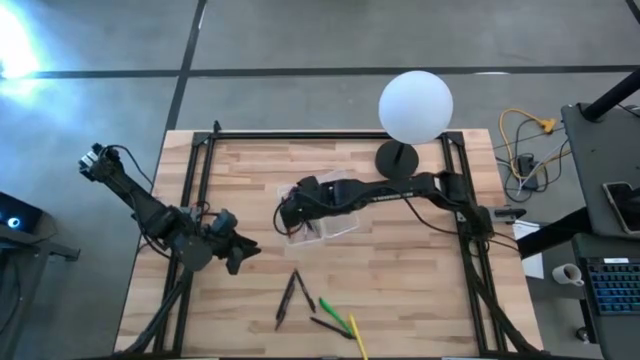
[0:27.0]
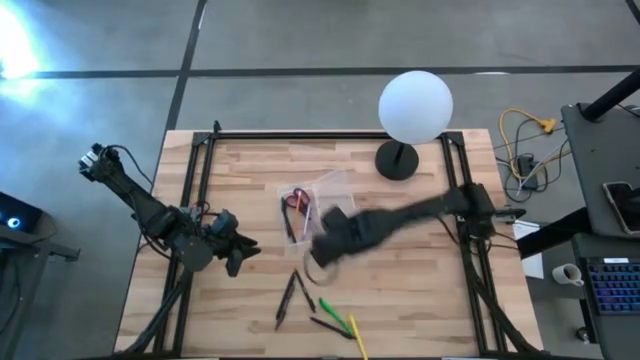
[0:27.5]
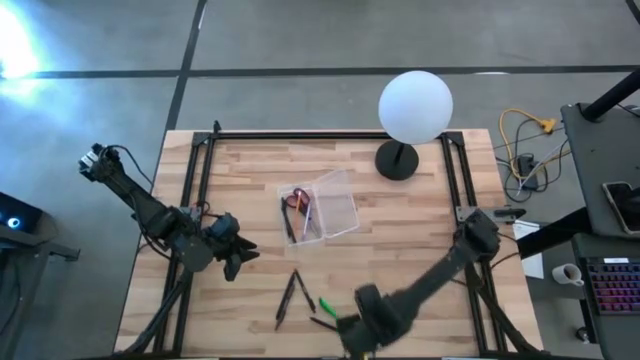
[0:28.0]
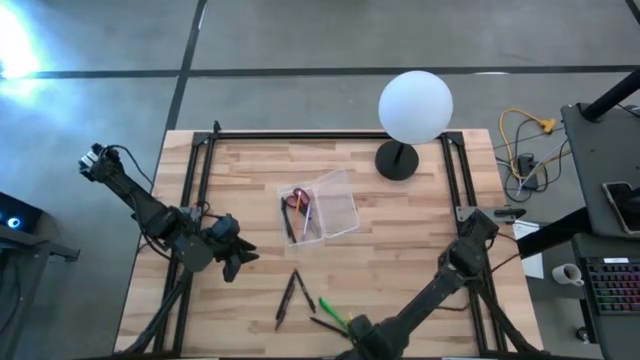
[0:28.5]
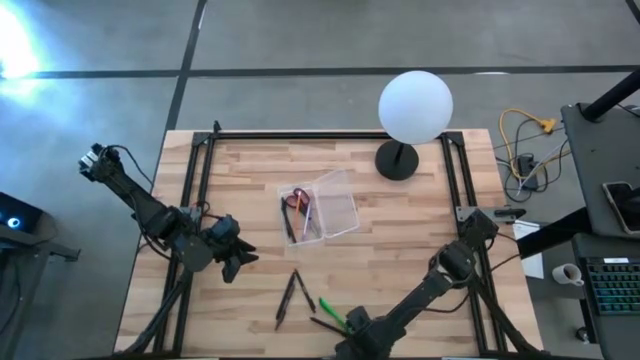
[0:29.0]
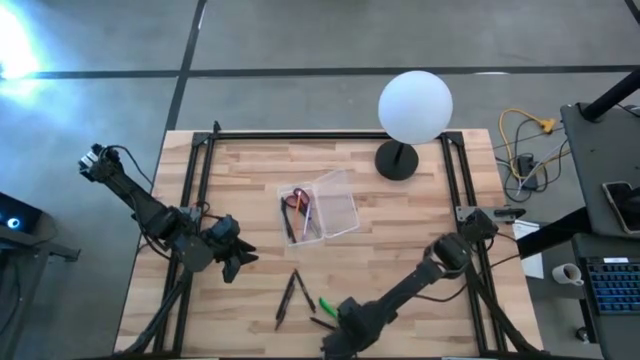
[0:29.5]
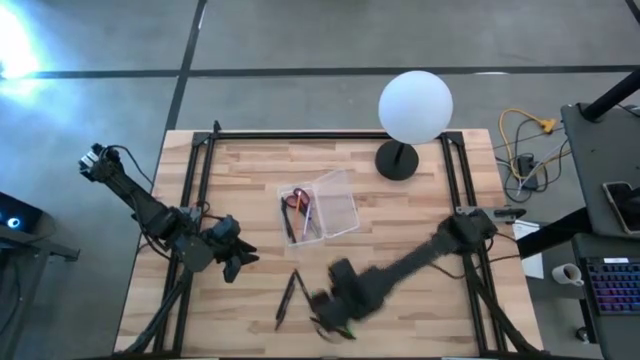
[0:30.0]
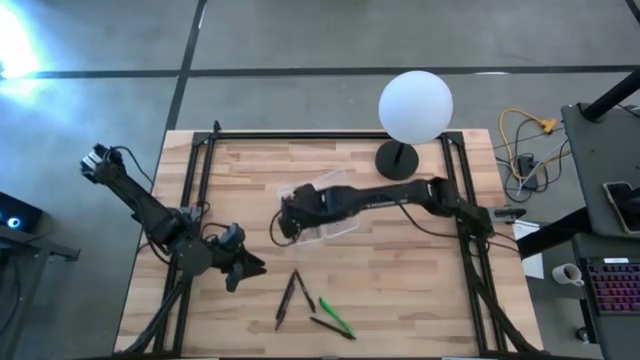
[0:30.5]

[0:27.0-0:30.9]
Task: Pick & place school supplies into a supply box
Put the yellow pen into the transparent supply box

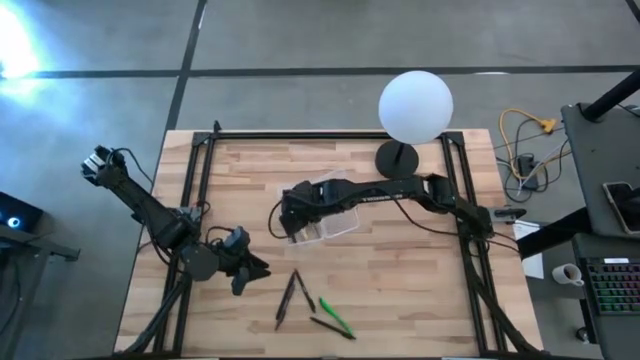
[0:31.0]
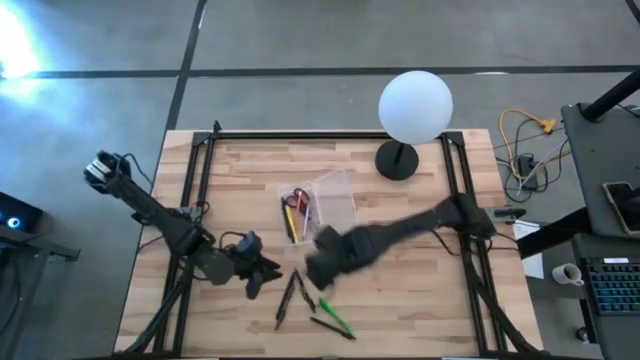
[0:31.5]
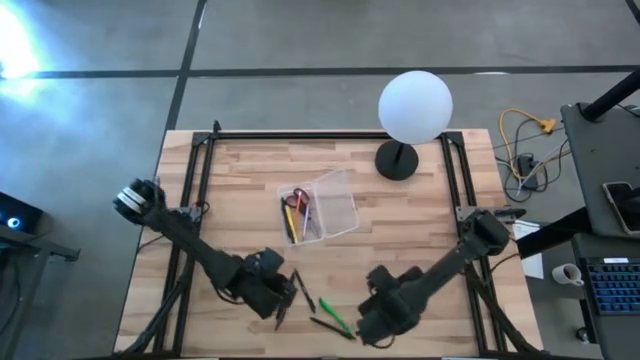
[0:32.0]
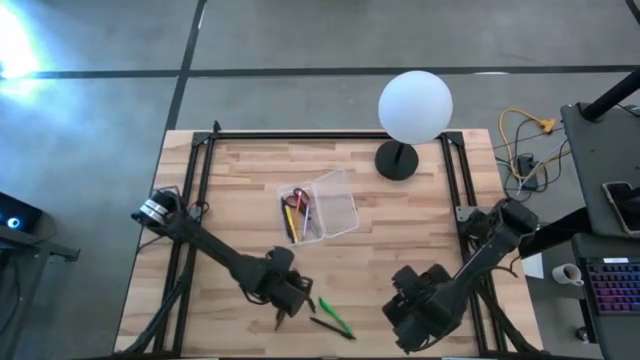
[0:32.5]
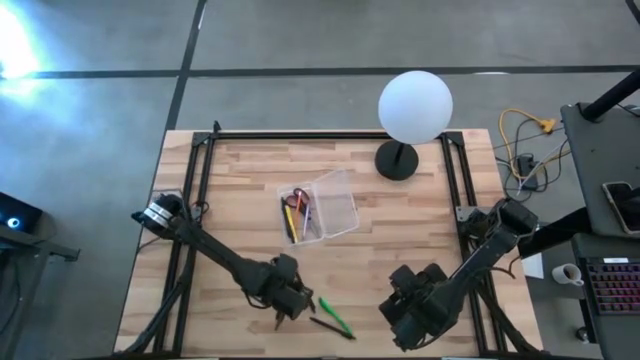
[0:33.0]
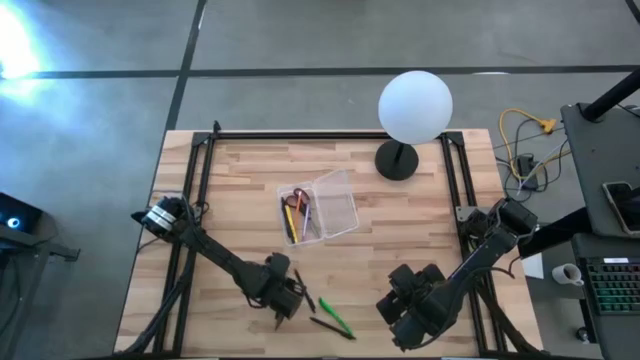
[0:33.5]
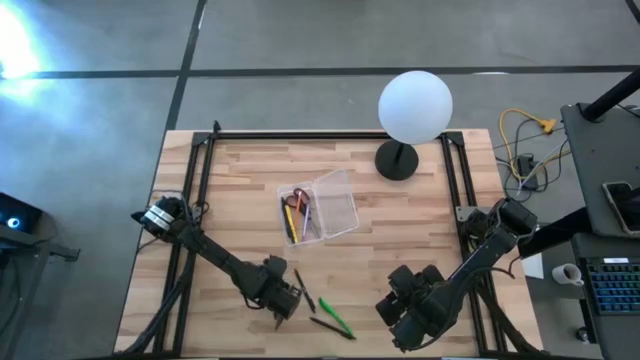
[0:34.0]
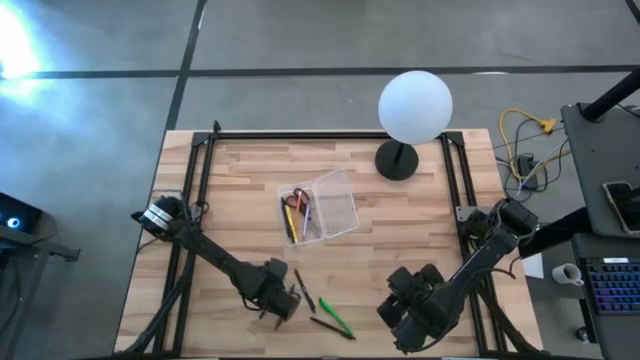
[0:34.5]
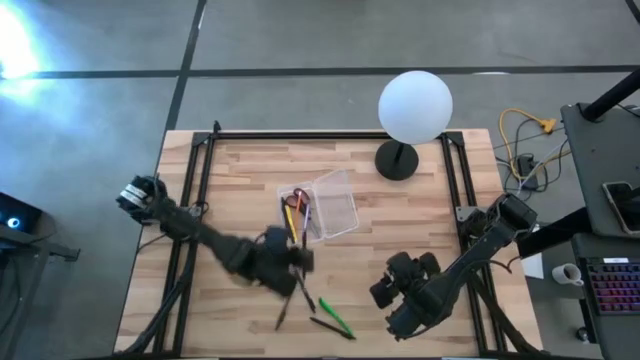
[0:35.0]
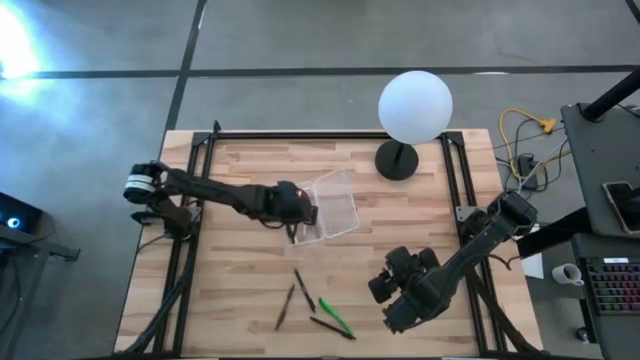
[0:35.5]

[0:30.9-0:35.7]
Put the black pen into the transparent supply box

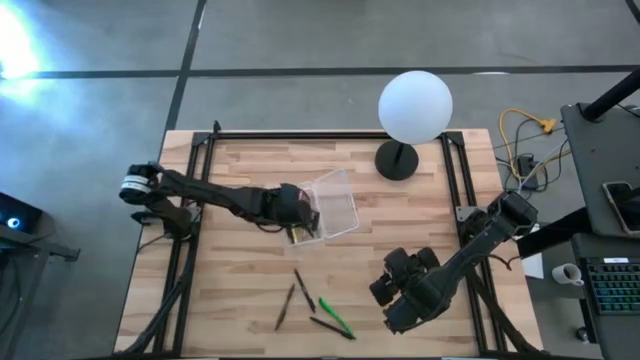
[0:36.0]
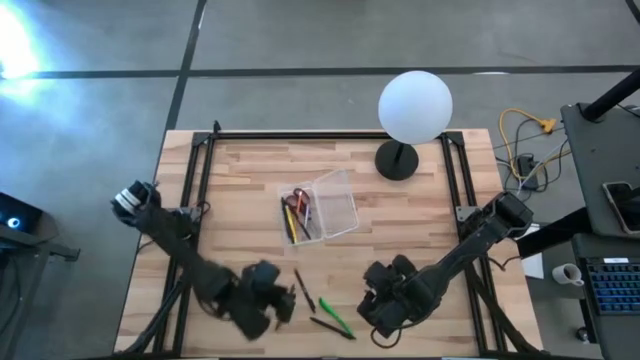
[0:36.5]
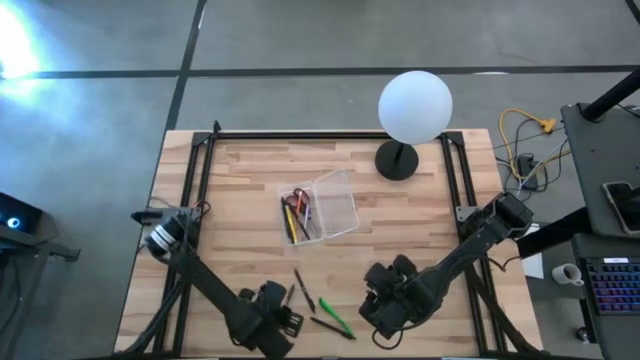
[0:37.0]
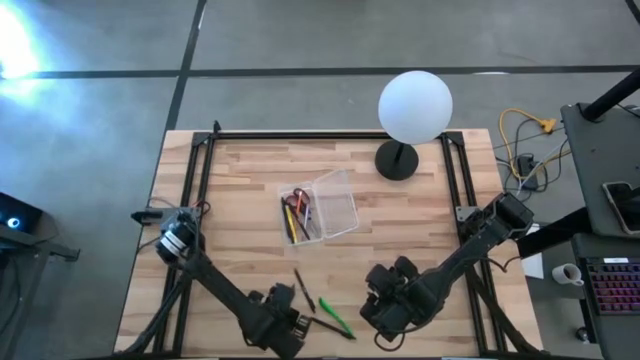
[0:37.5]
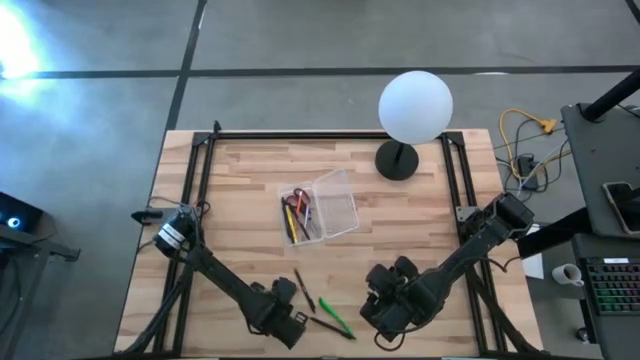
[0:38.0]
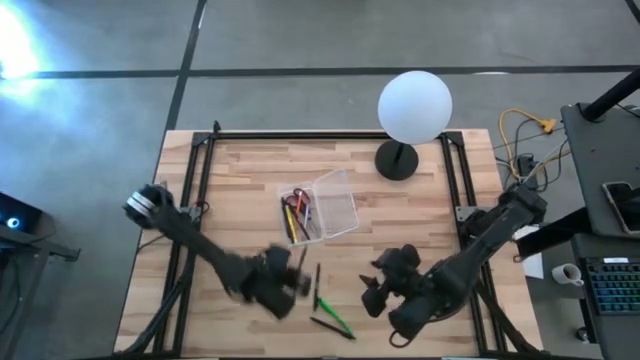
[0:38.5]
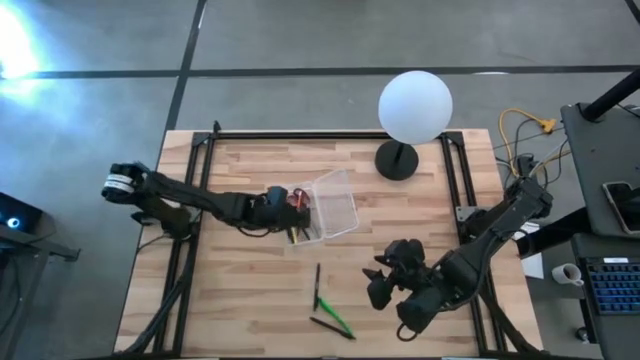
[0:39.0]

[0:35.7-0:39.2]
Put the brown pen into the transparent supply box

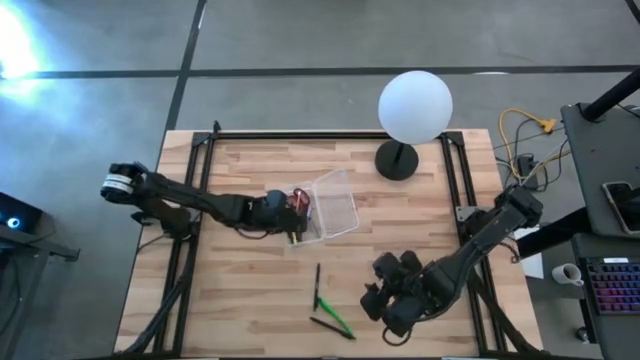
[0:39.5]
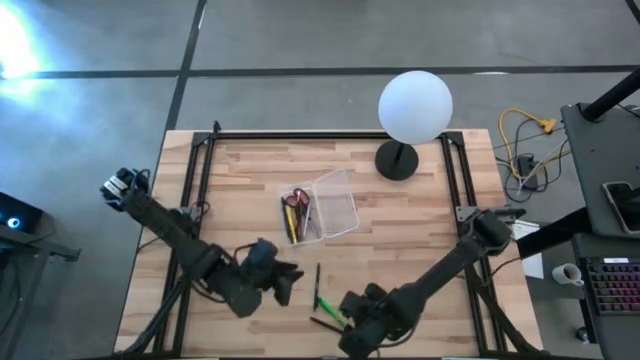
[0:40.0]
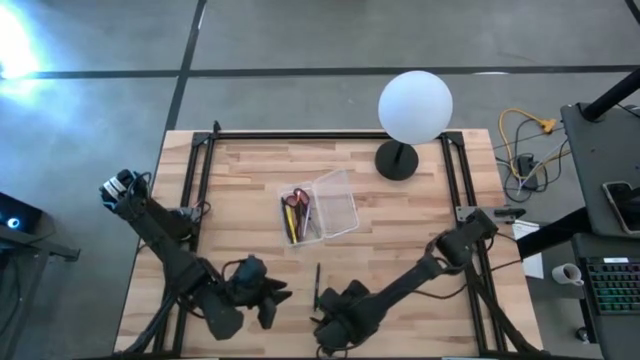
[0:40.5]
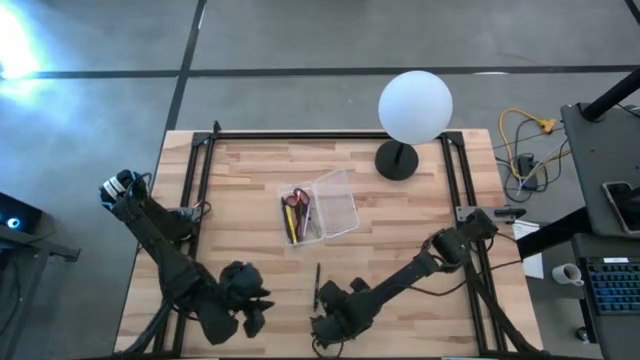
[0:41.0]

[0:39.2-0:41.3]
Put the green pen into the transparent supply box

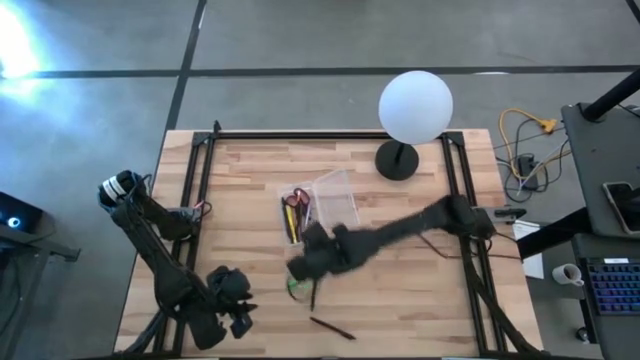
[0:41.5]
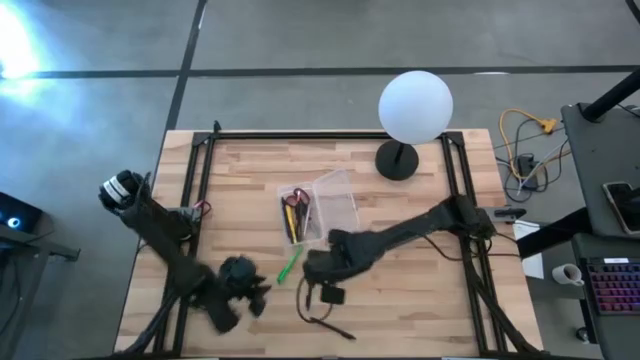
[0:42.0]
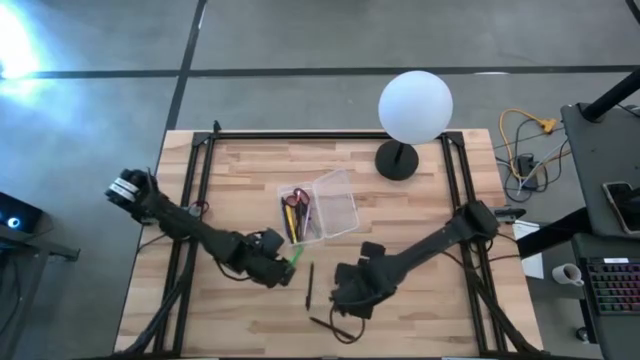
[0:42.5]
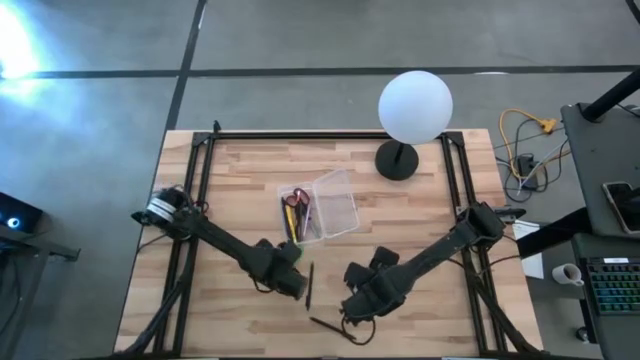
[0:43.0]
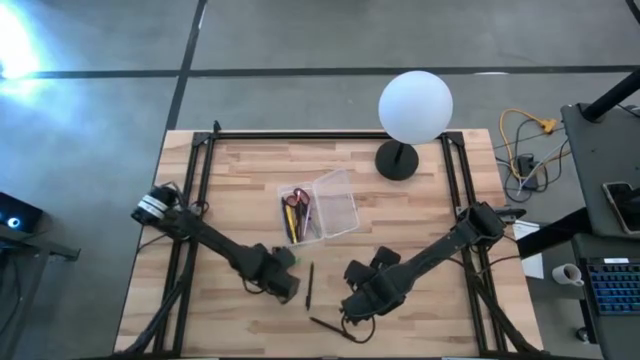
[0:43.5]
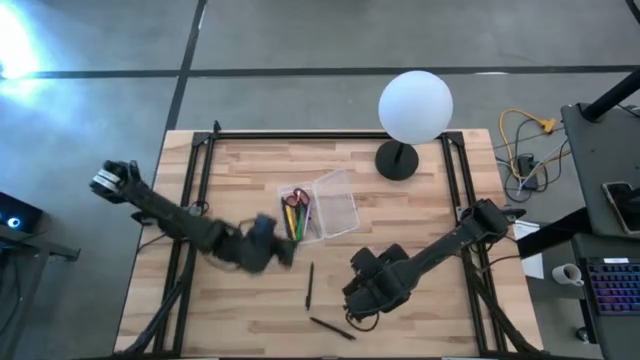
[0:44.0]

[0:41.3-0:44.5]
Put the green pen into the transparent supply box

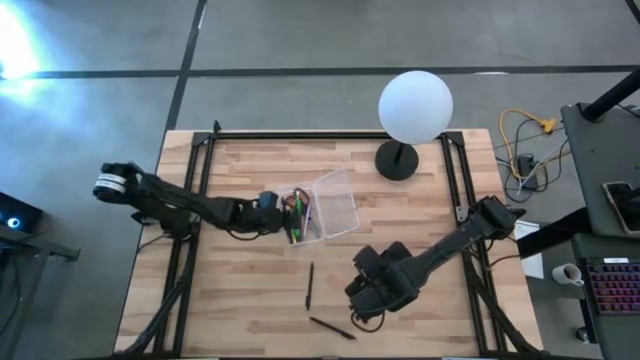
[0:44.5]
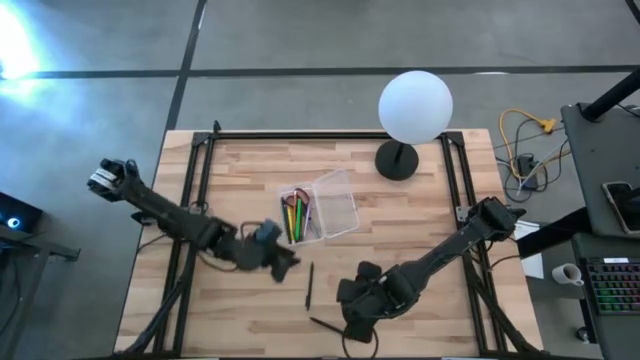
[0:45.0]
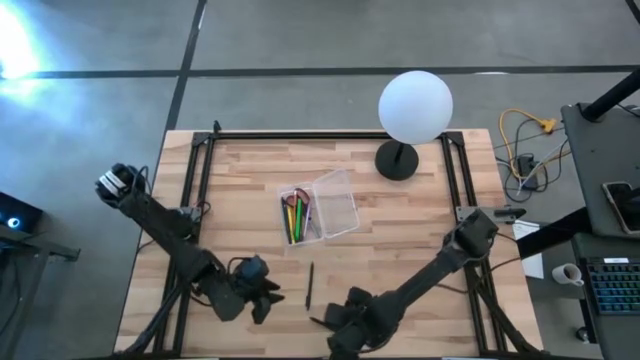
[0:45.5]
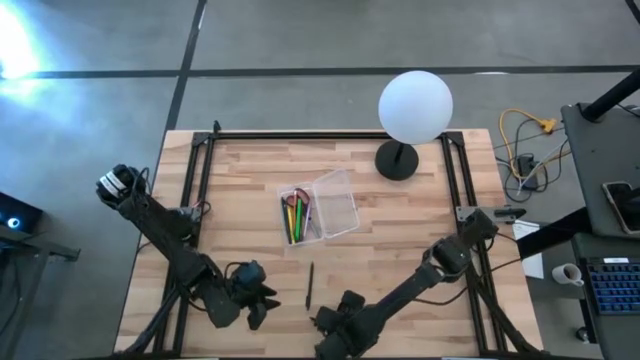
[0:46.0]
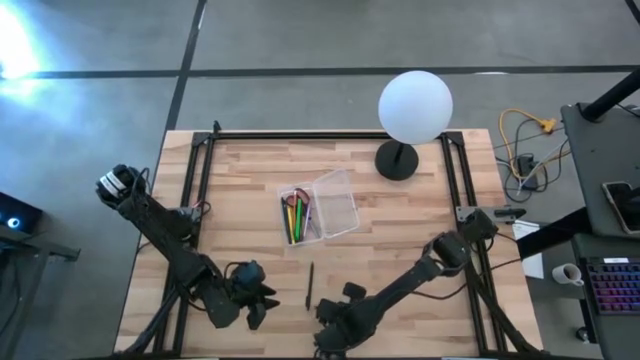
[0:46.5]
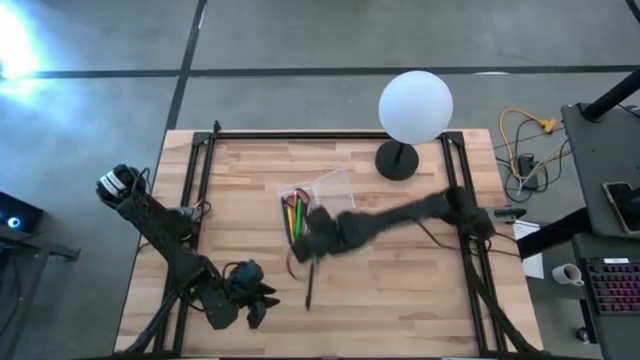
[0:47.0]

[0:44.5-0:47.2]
Put the black pen into the transparent supply box

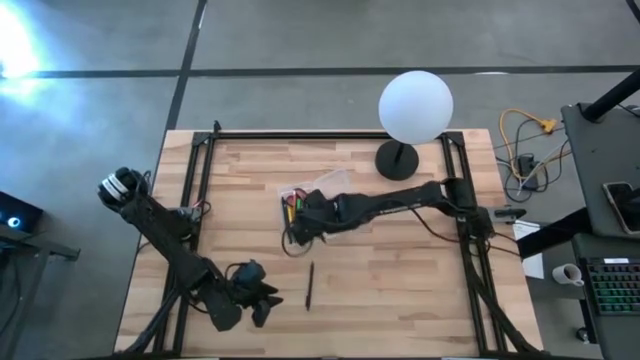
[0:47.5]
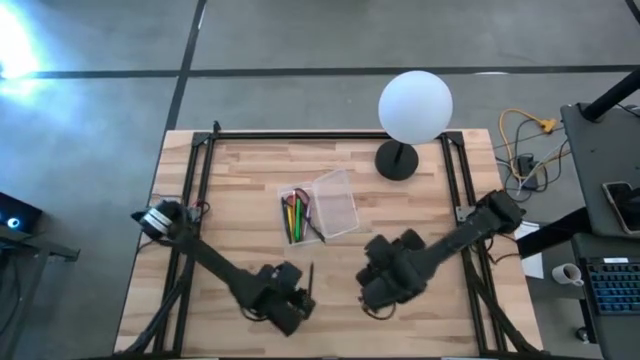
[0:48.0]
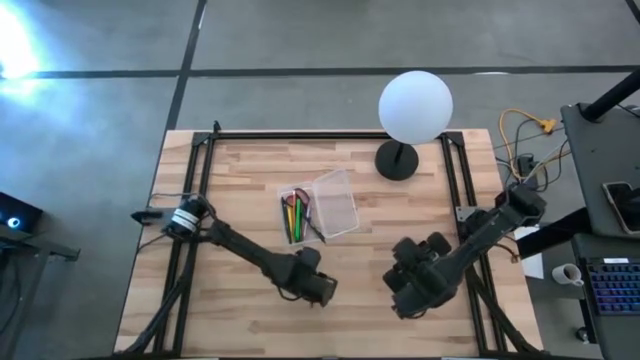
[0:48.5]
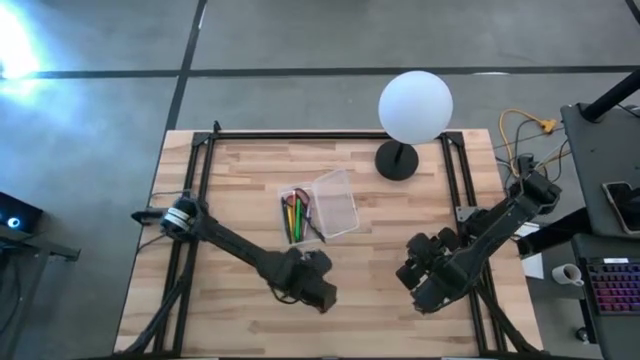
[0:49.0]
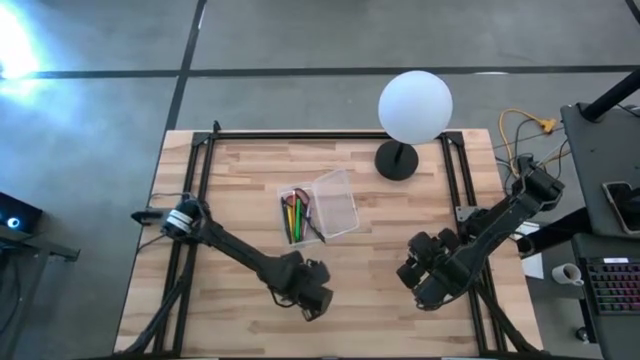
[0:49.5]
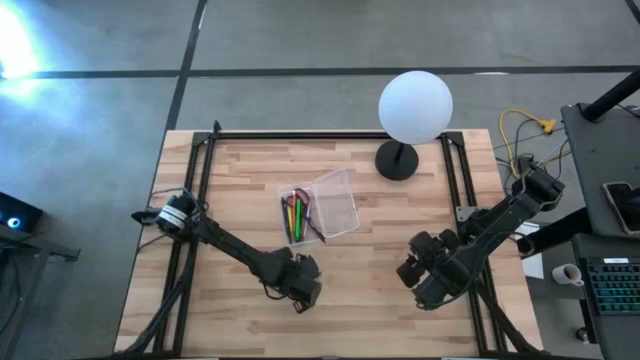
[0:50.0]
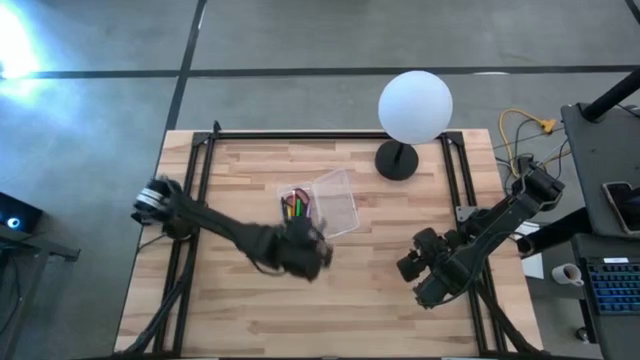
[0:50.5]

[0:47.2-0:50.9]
Put the black pen into the transparent supply box
